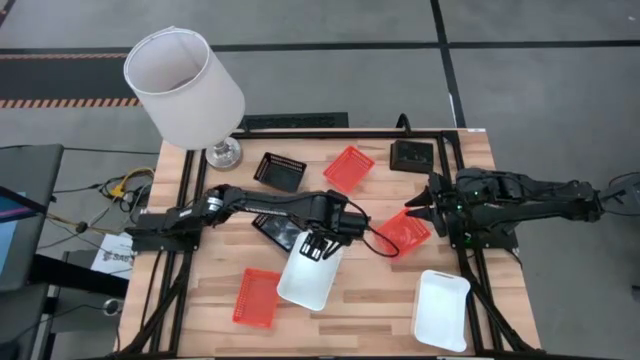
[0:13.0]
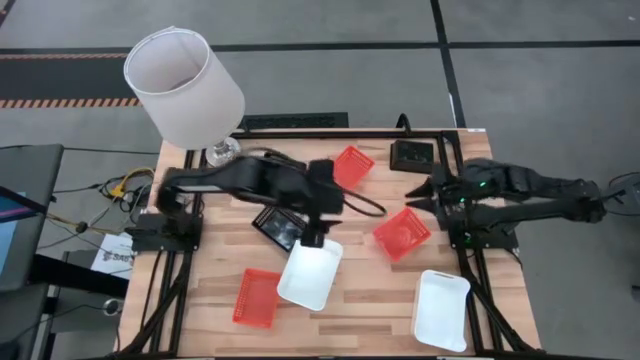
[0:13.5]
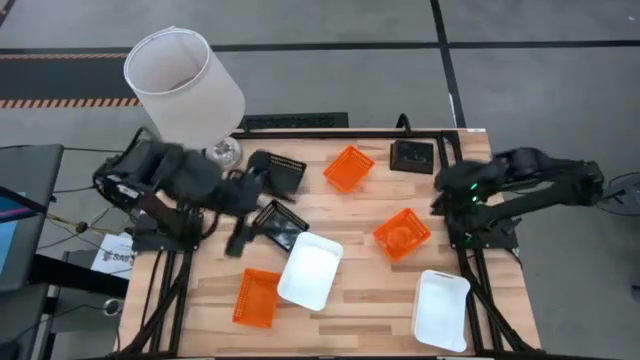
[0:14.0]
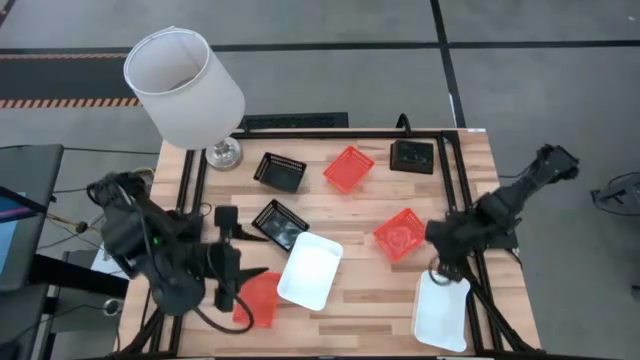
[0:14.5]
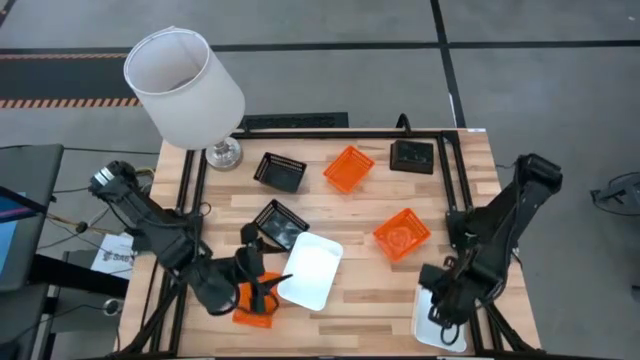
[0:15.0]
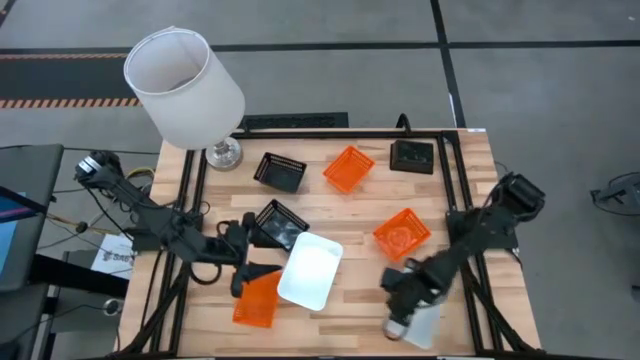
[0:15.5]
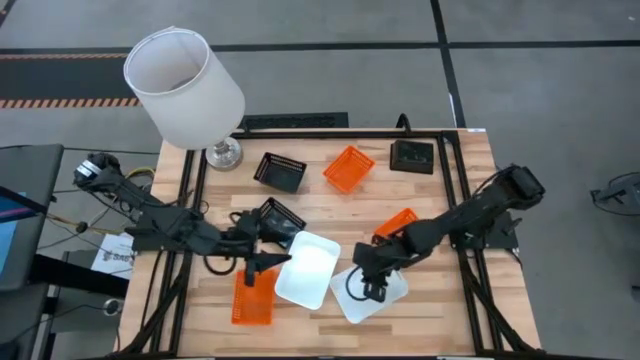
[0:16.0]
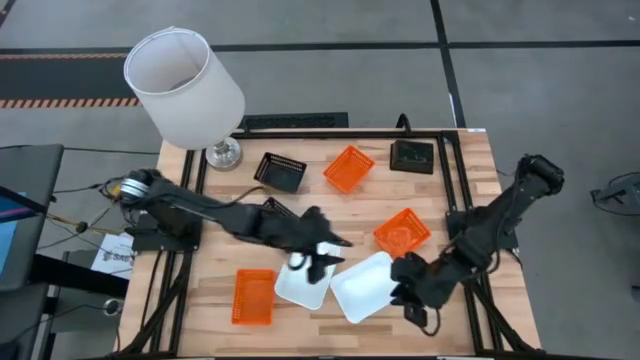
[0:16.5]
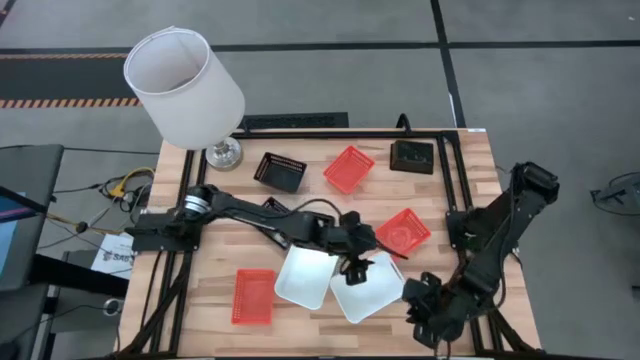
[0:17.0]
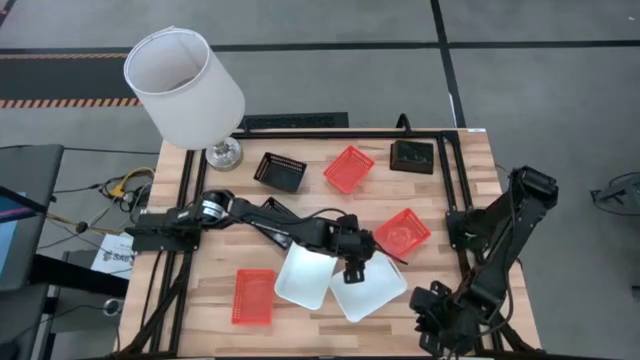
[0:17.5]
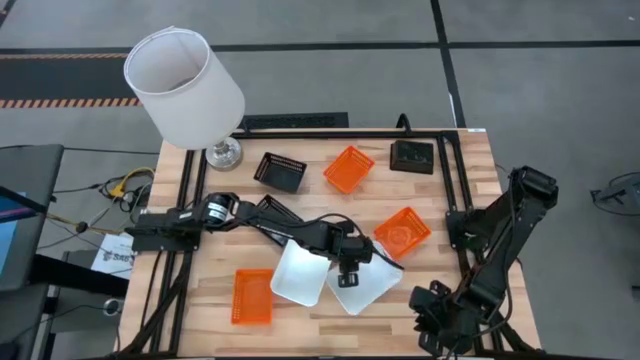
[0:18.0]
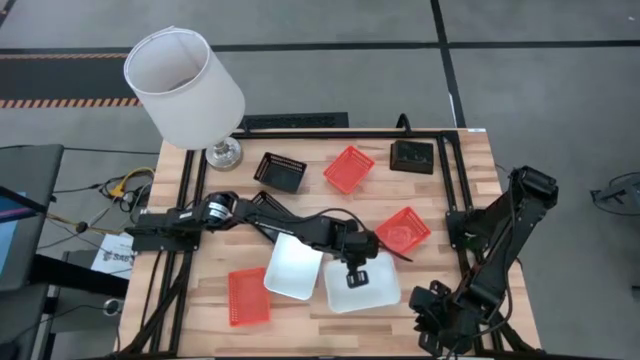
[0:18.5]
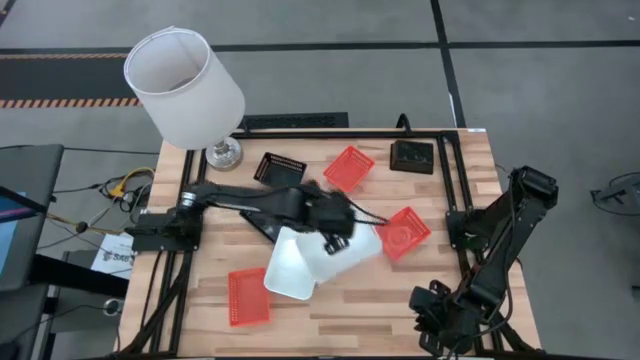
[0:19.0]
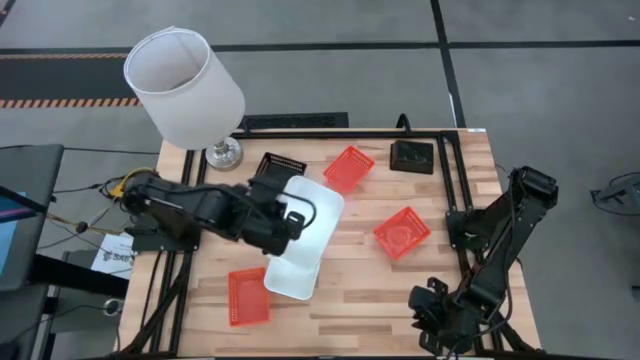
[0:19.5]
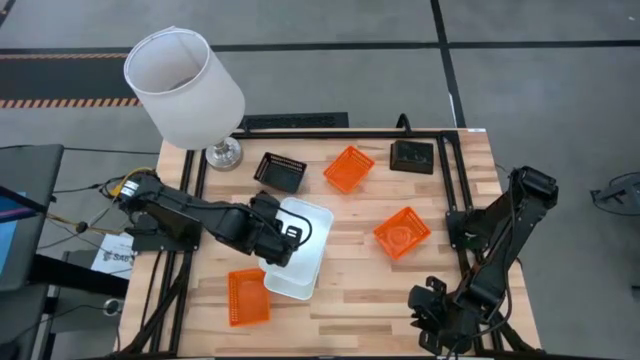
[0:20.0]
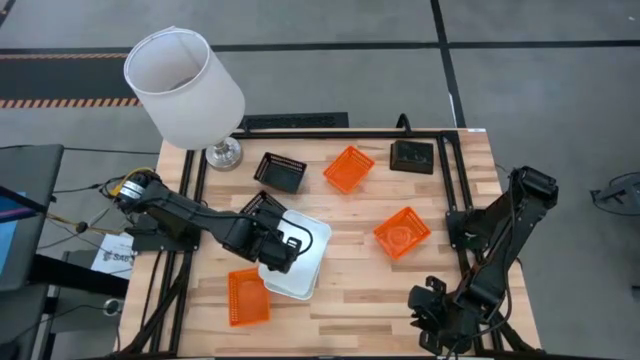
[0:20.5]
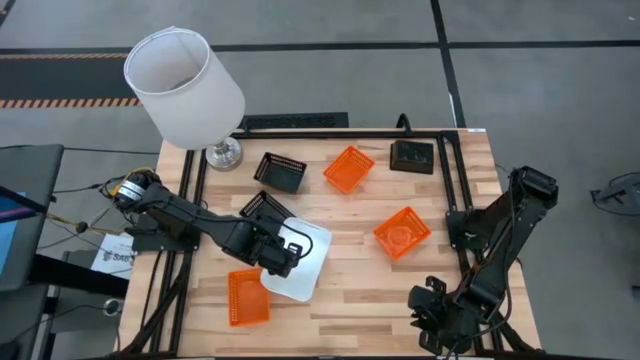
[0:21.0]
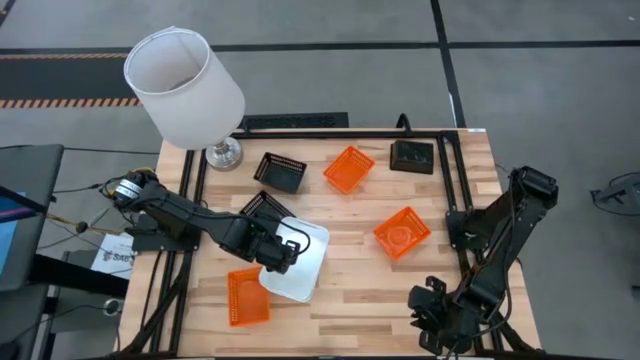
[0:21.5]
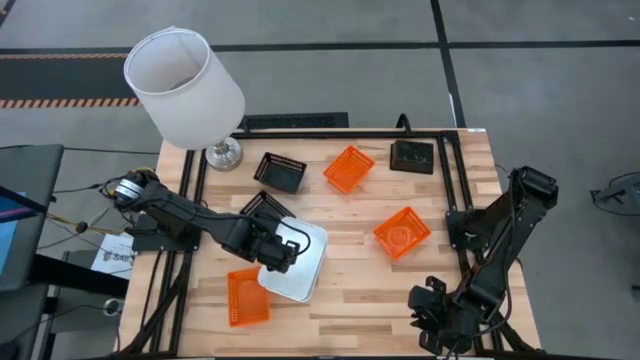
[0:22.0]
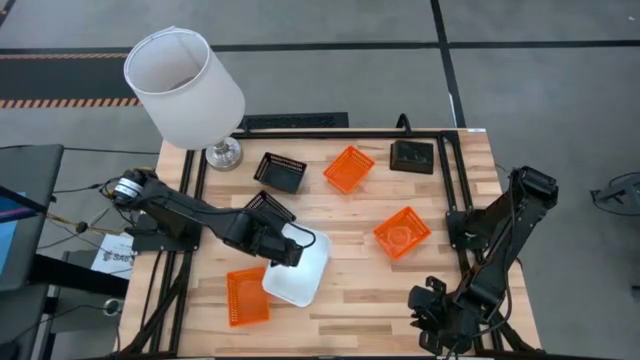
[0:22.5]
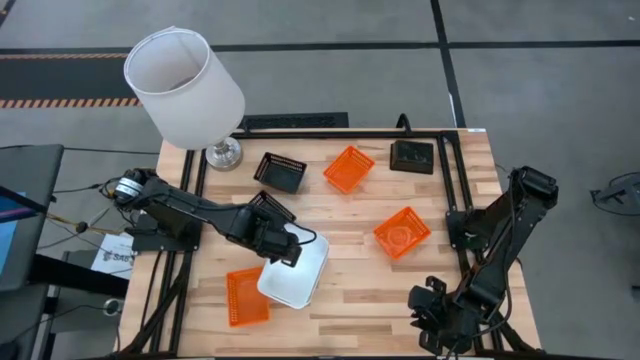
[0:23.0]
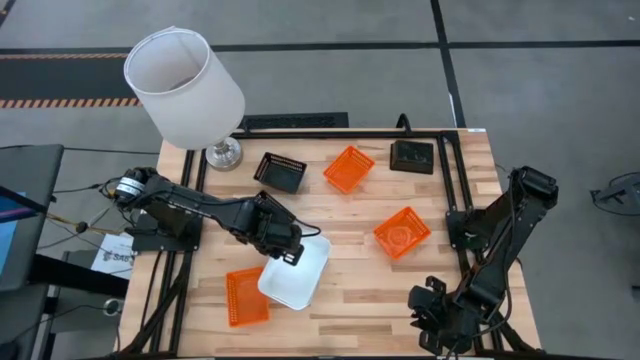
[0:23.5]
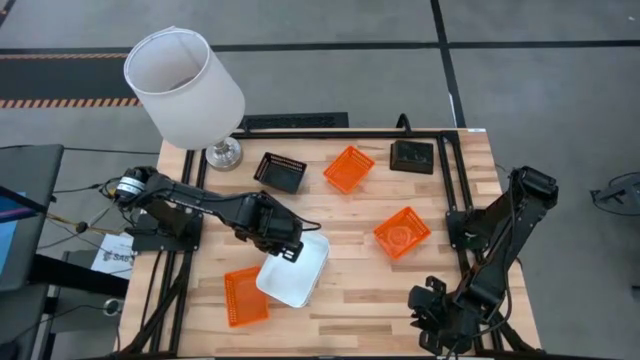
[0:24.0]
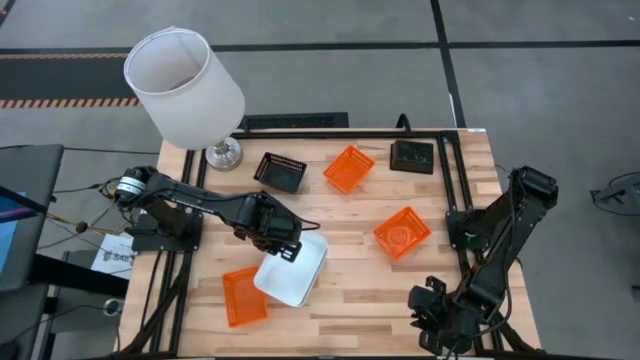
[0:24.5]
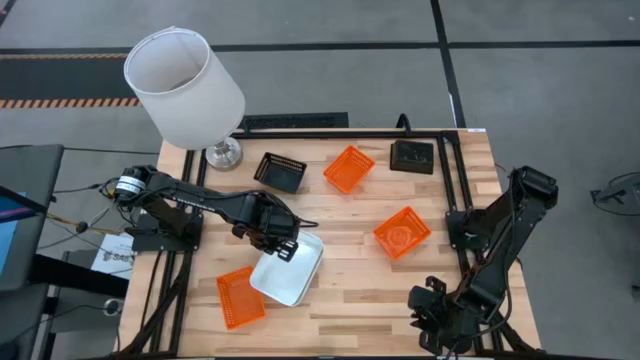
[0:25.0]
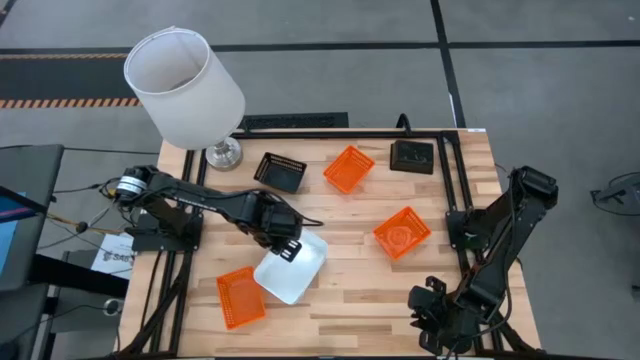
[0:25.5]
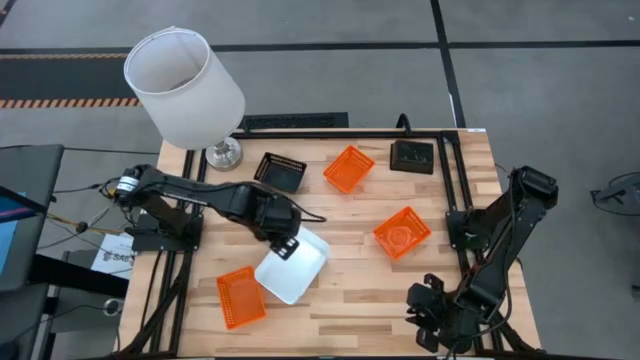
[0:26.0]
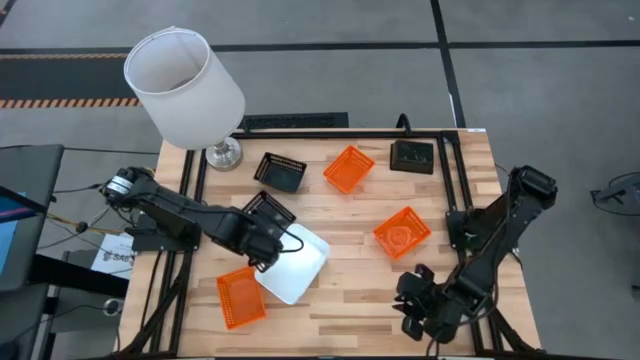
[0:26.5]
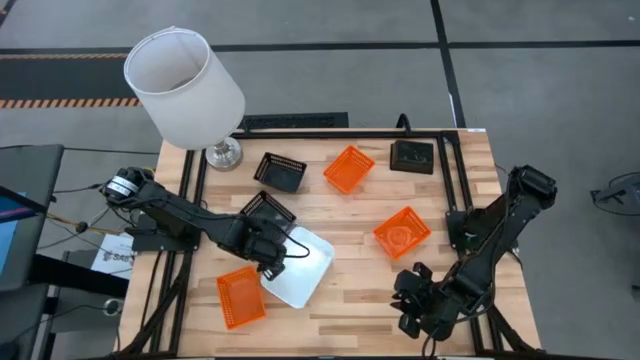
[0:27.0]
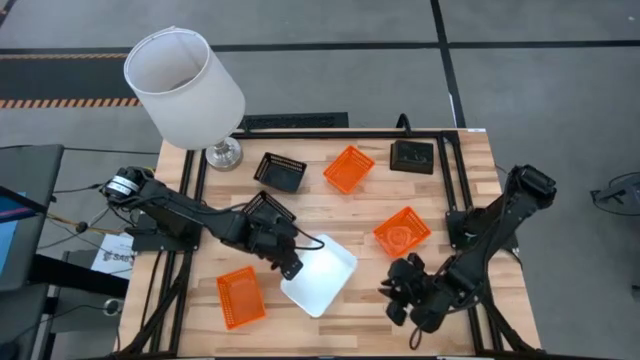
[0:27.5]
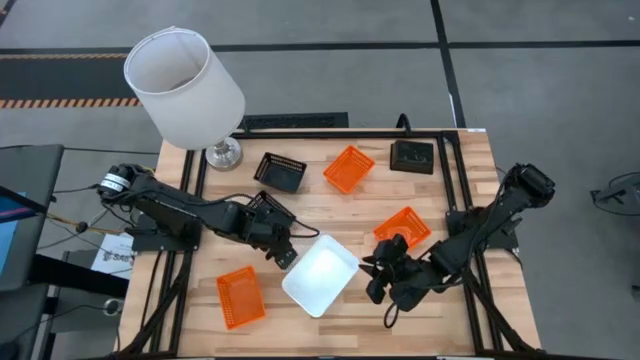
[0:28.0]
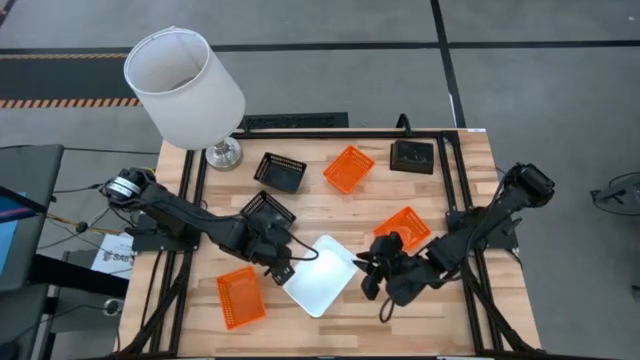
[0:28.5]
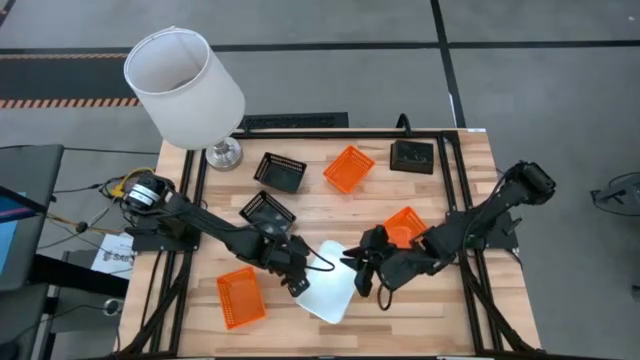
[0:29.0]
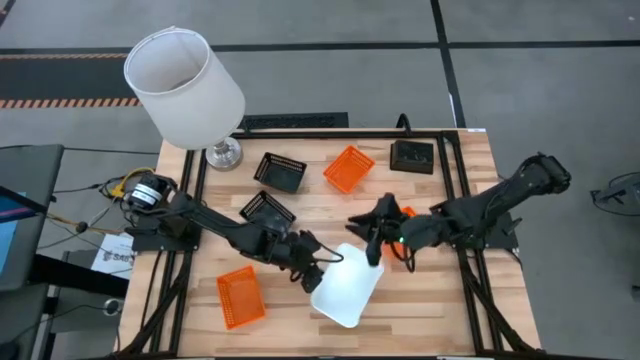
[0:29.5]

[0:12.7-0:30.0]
Stack the right white bin on the white bins

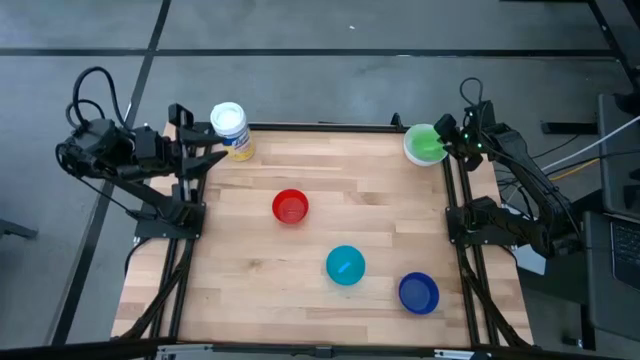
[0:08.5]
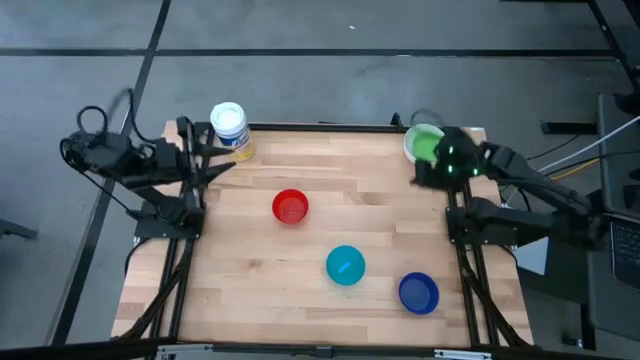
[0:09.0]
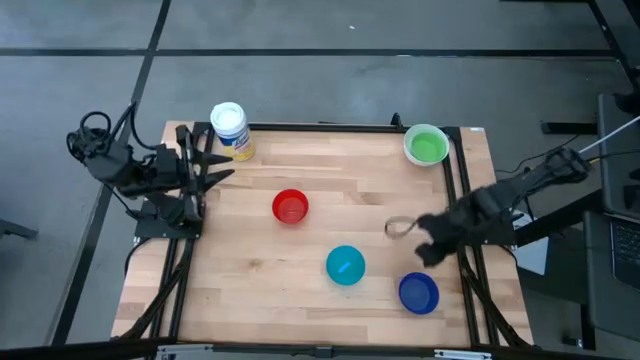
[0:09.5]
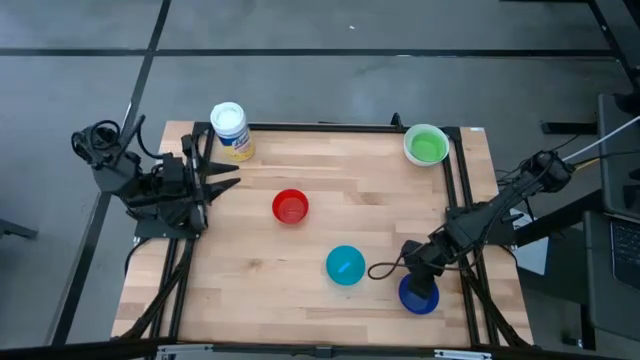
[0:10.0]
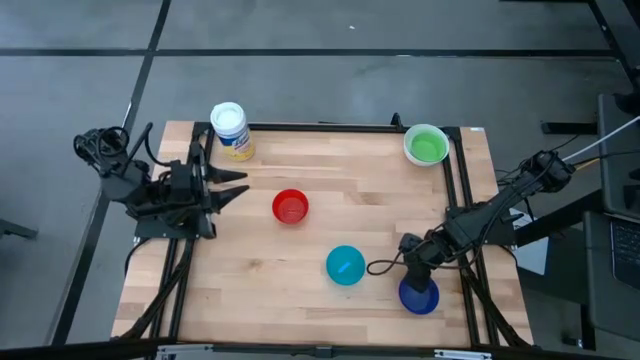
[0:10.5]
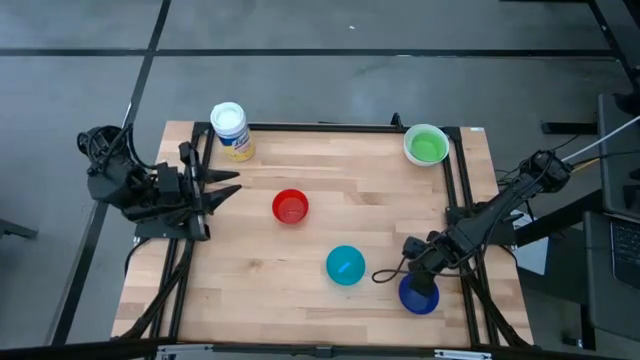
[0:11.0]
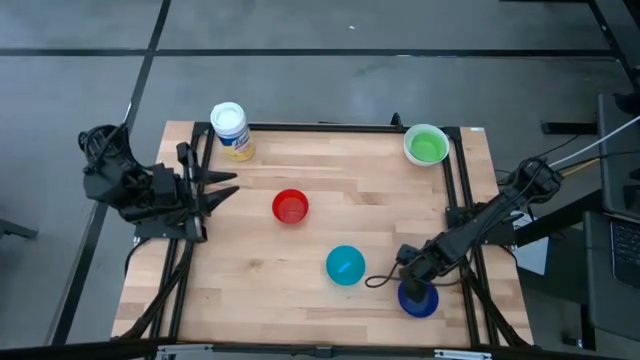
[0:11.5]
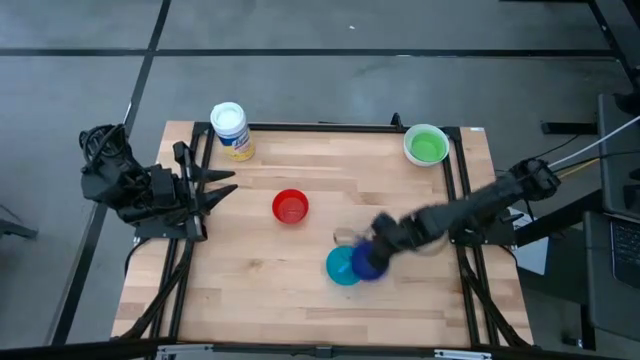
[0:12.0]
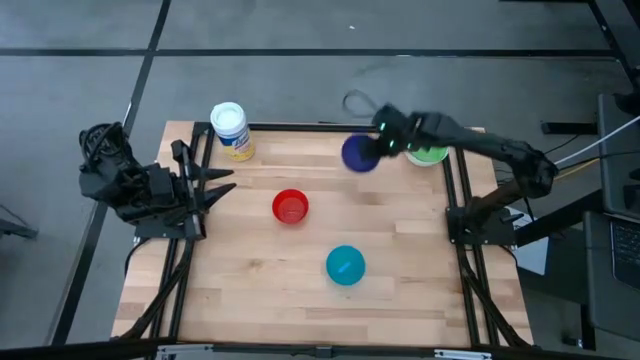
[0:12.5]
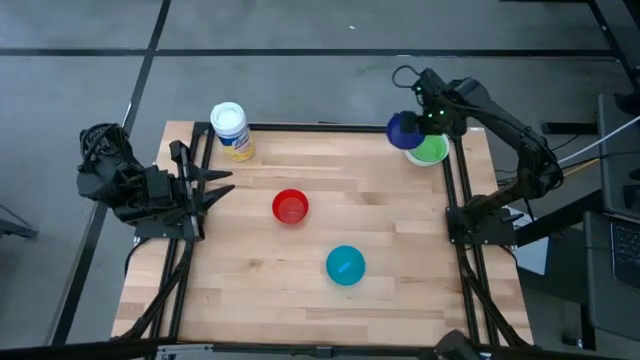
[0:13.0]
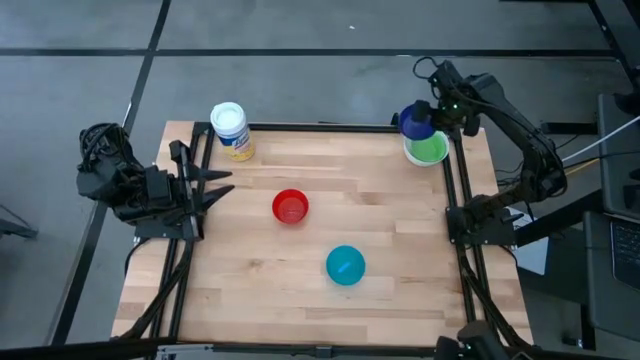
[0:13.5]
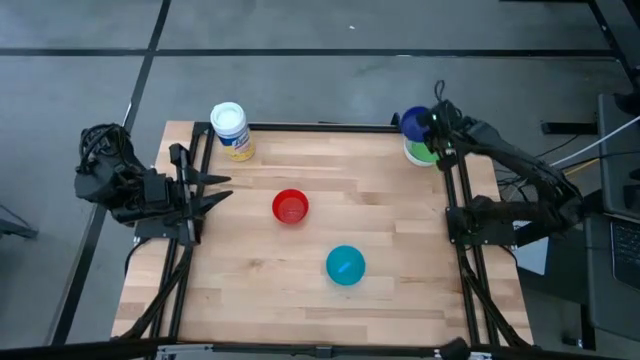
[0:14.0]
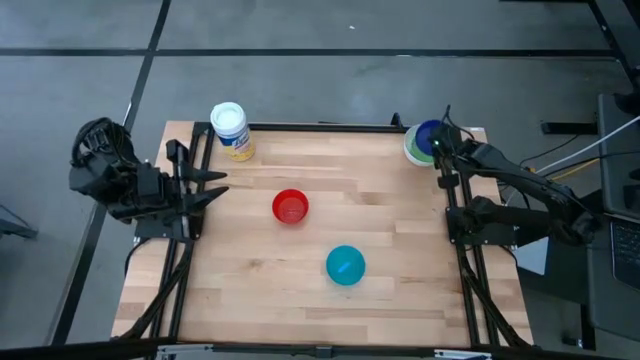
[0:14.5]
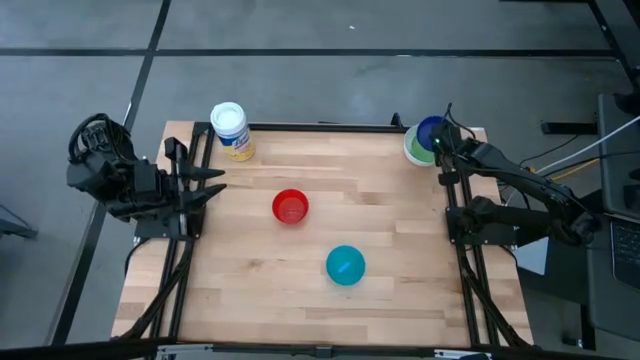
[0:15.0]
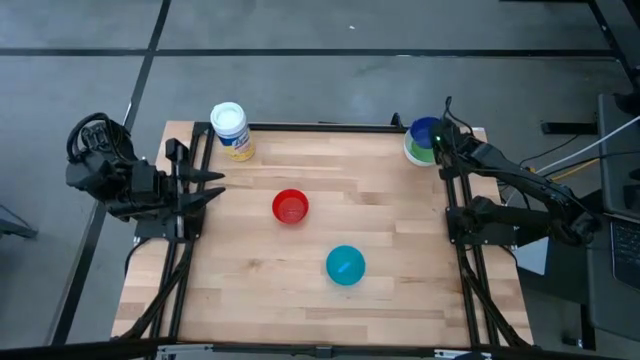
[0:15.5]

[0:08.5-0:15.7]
Stack the dark blue bowl on top of the green bowl
